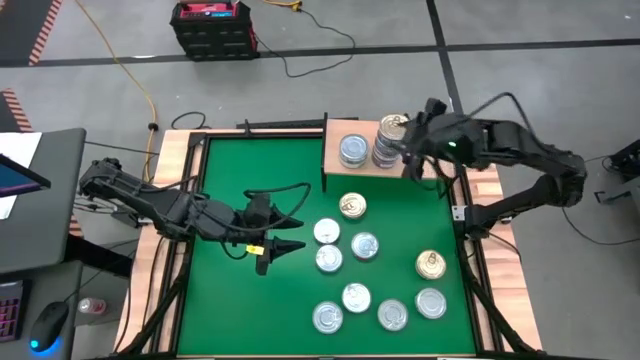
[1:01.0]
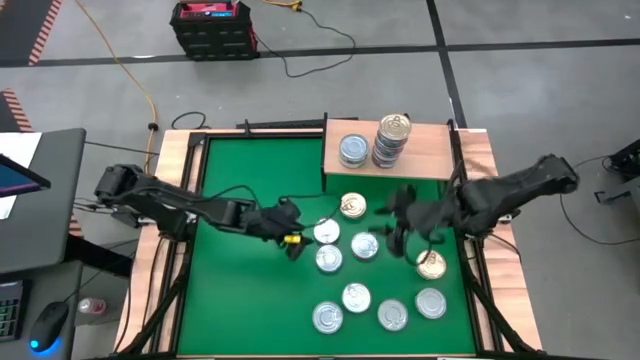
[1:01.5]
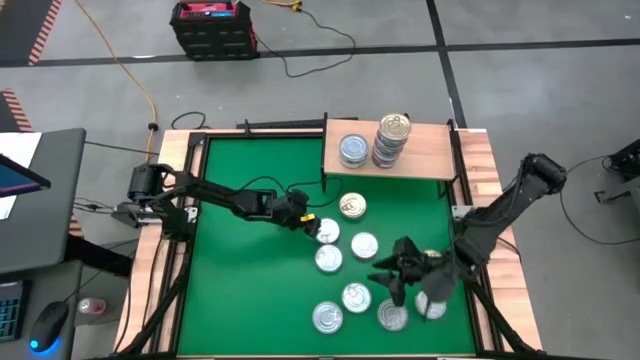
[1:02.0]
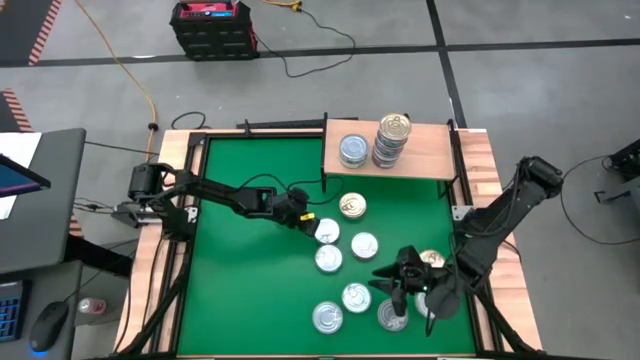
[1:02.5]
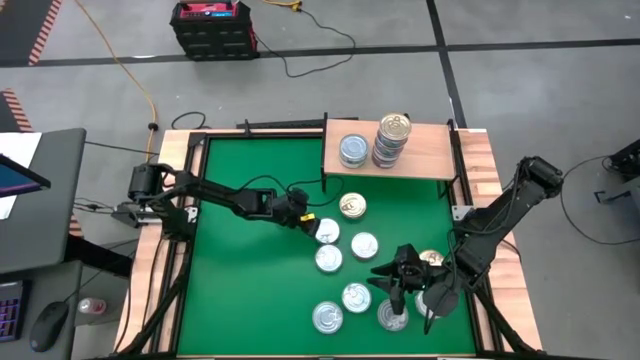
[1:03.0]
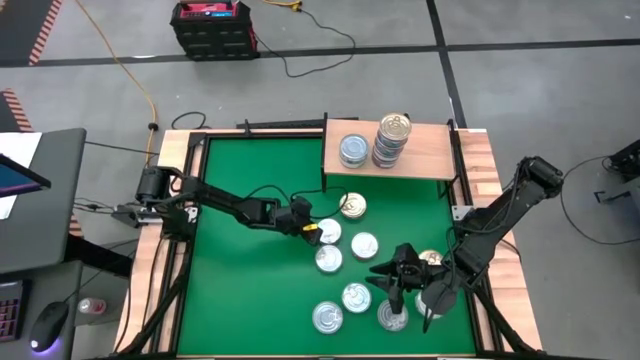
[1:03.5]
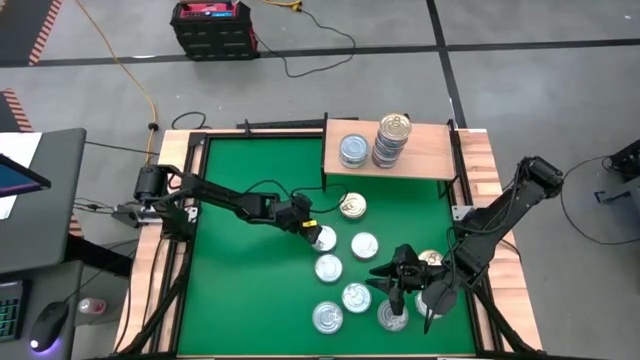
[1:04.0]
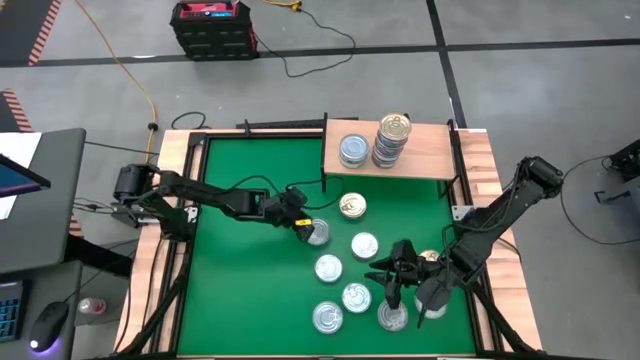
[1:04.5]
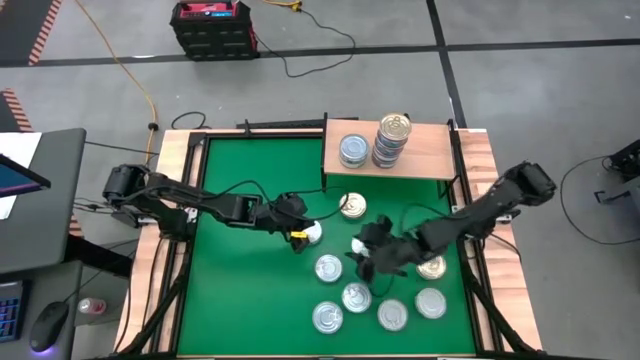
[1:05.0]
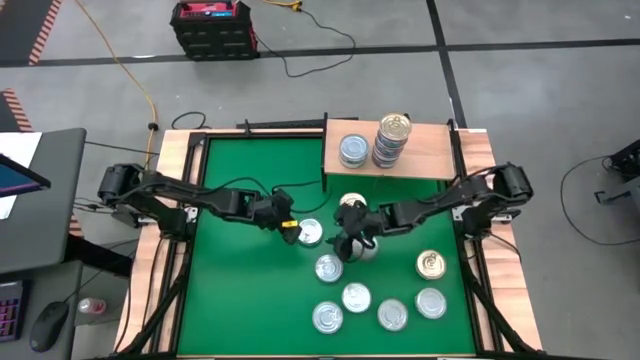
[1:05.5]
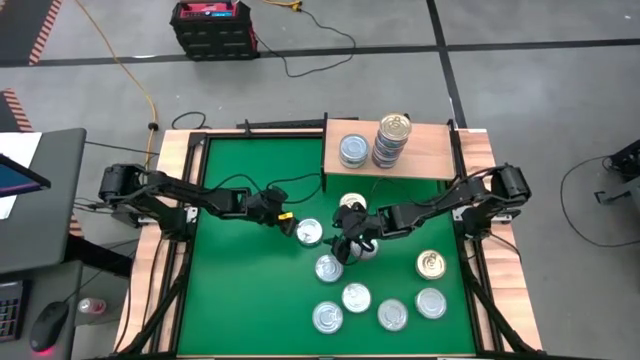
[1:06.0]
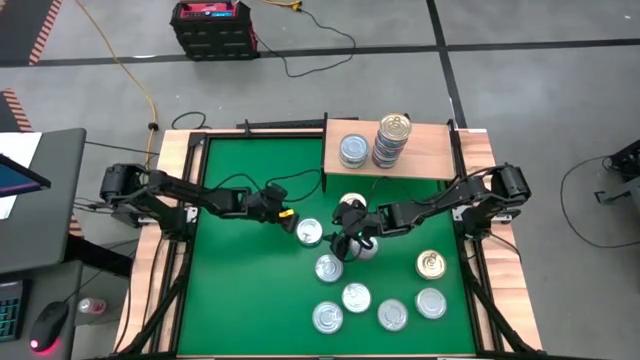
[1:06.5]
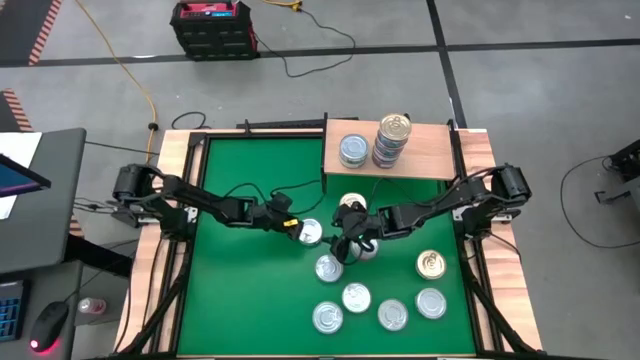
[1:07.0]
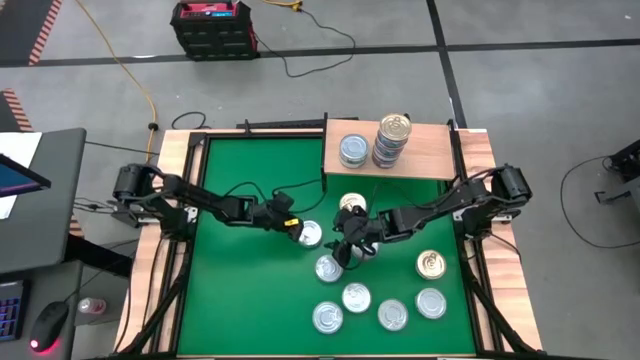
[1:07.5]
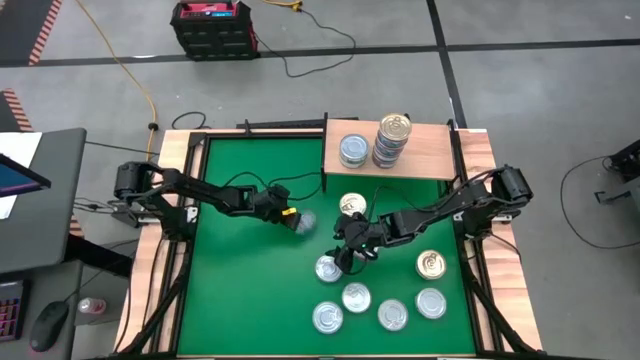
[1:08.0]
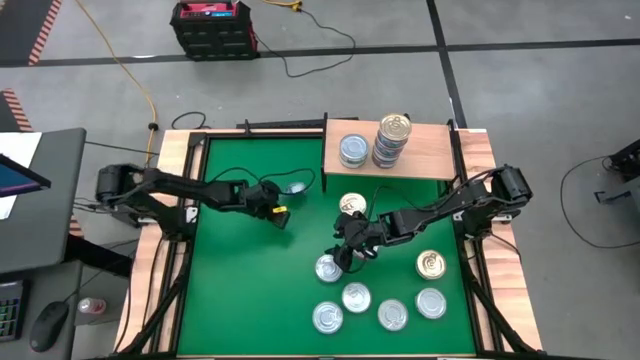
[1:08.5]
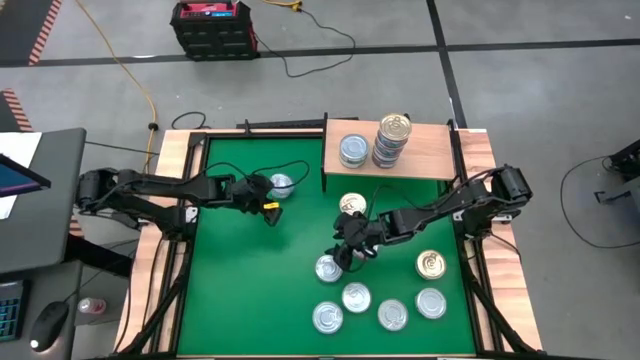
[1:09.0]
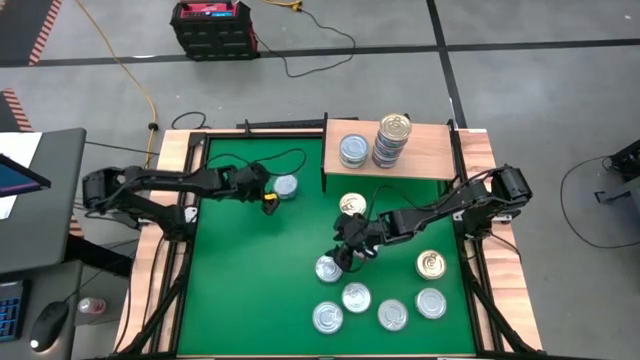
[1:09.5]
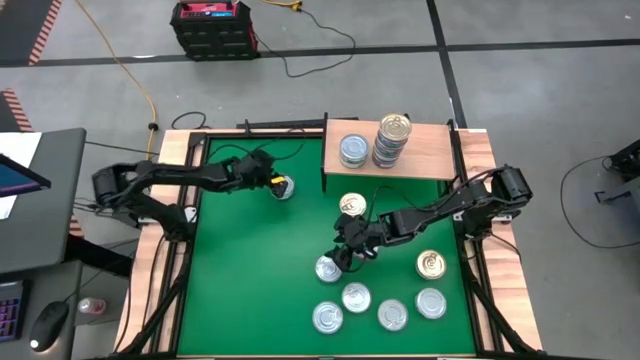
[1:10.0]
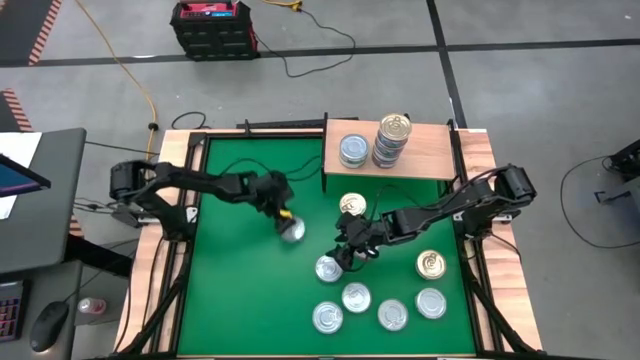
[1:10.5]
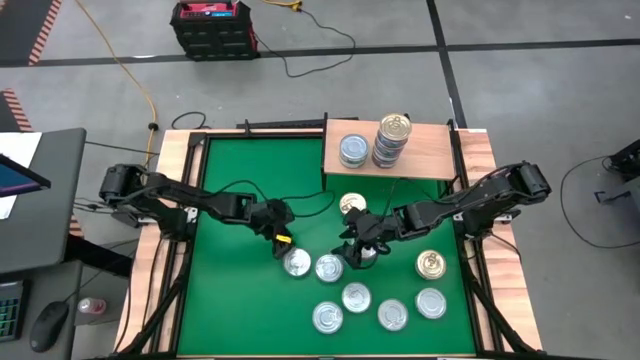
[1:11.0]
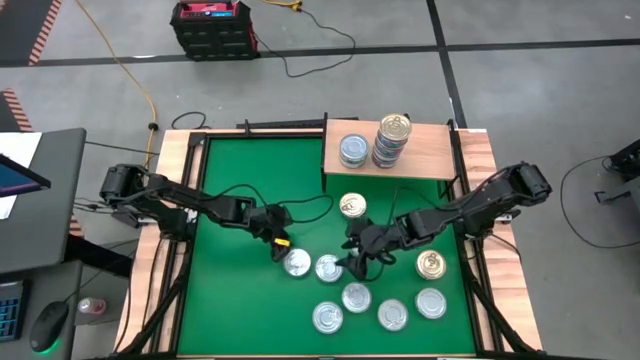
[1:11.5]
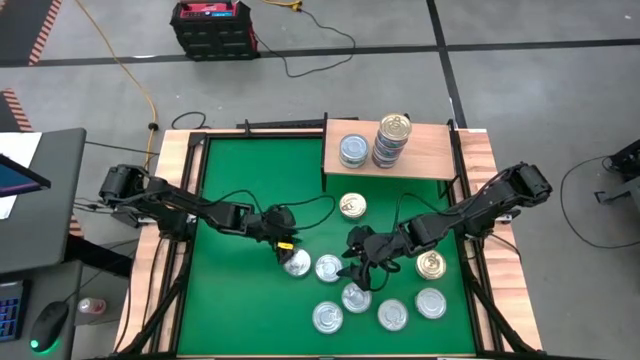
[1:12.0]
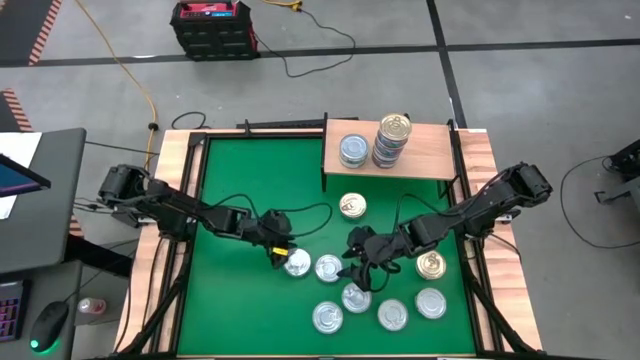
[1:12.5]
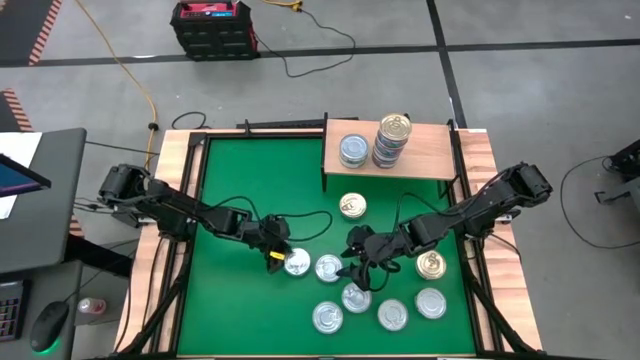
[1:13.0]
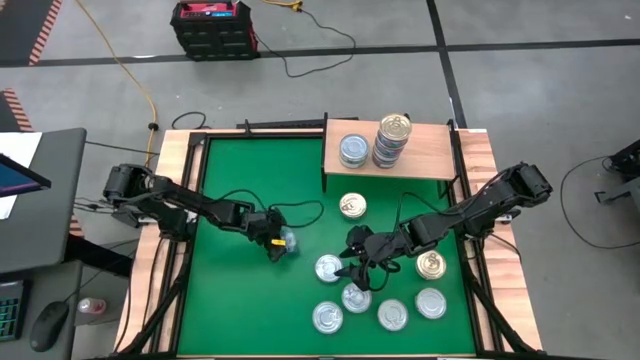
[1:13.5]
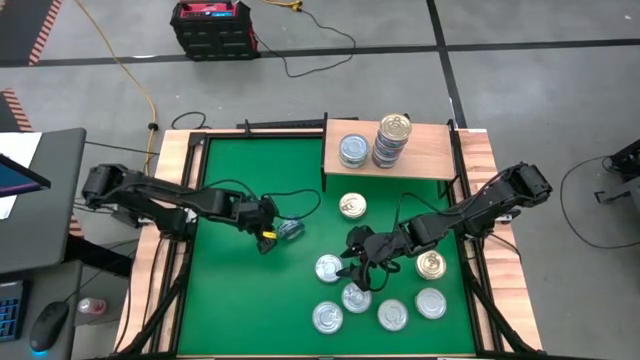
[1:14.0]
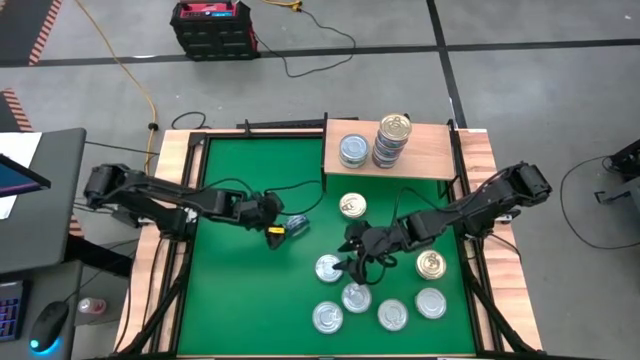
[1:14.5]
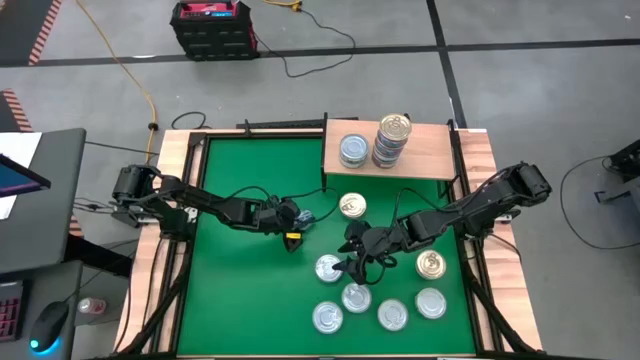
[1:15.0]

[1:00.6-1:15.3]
Task: Stack canned seafood by type on shelf
Put the blue tuna can on the shelf

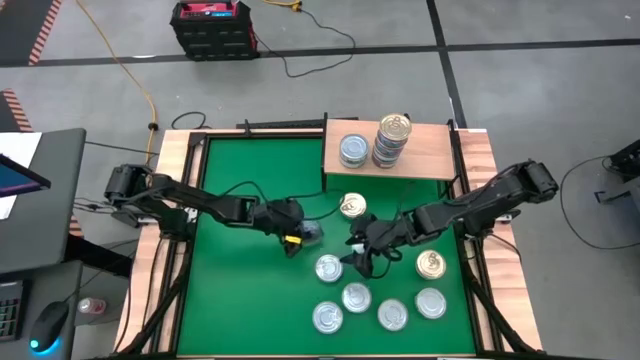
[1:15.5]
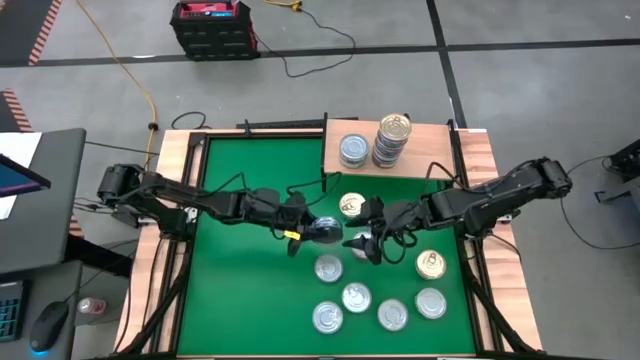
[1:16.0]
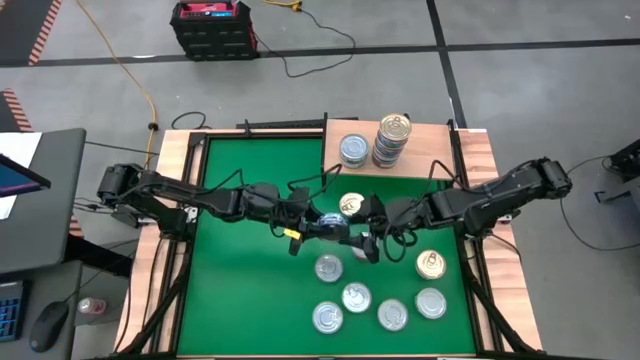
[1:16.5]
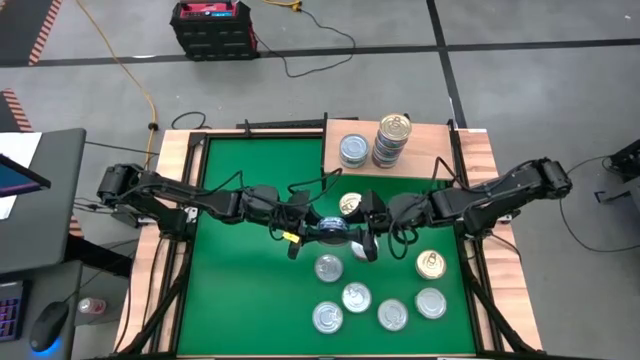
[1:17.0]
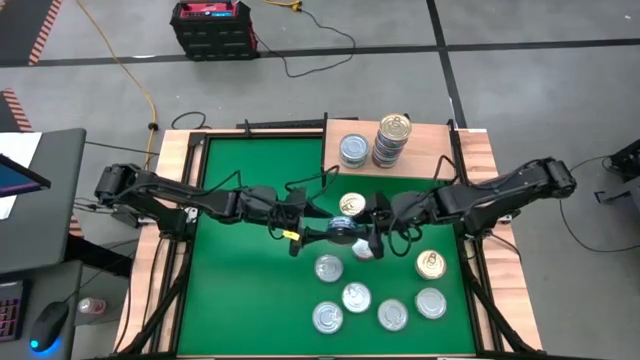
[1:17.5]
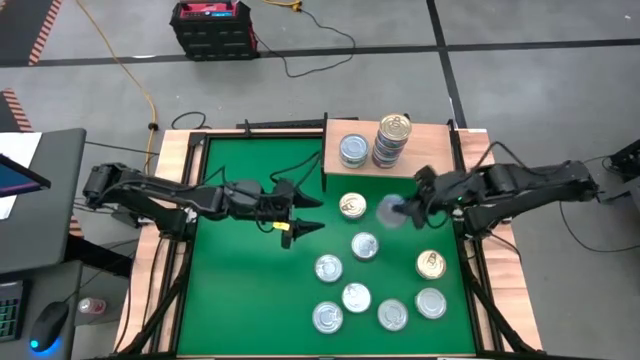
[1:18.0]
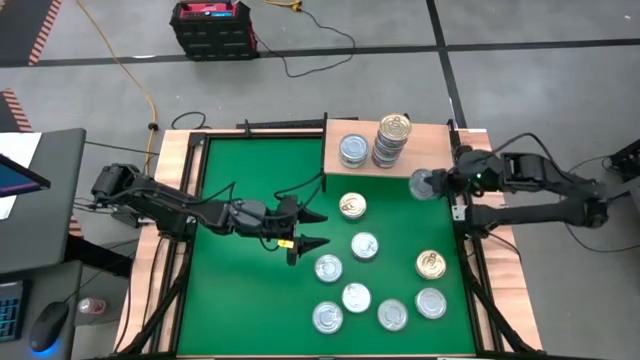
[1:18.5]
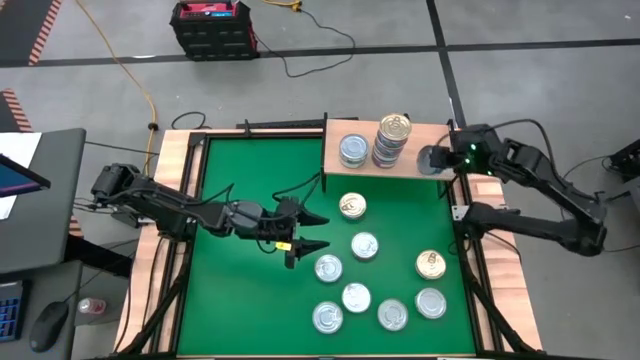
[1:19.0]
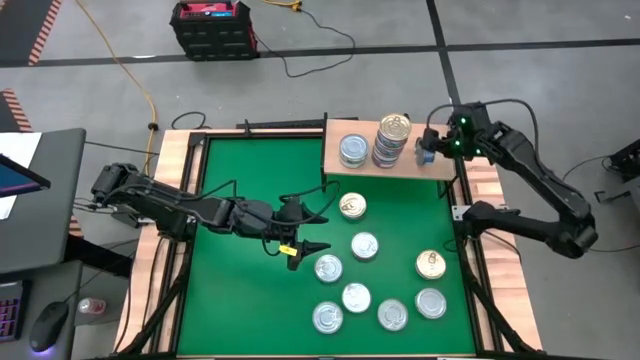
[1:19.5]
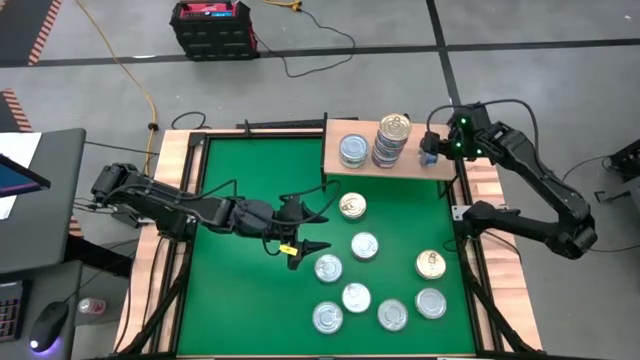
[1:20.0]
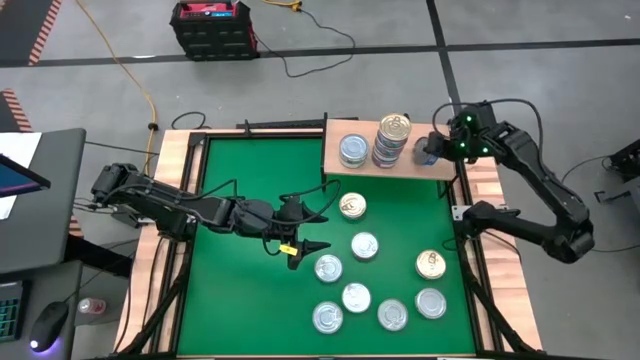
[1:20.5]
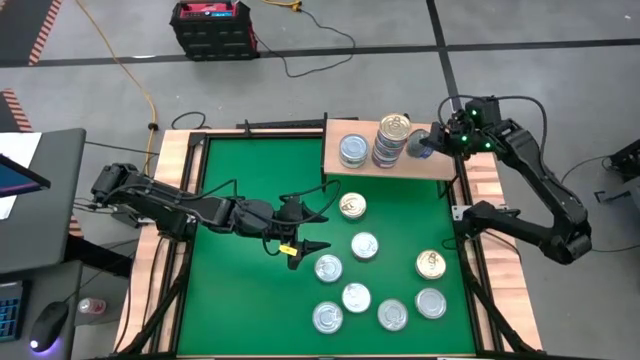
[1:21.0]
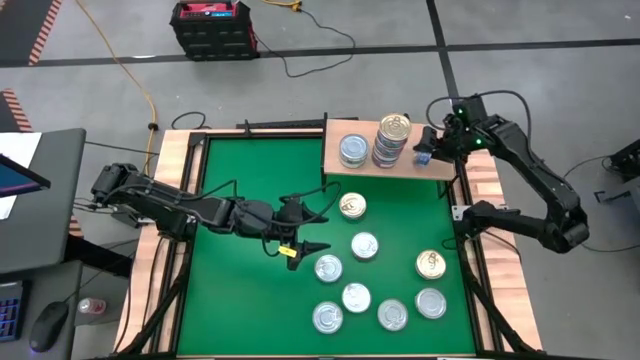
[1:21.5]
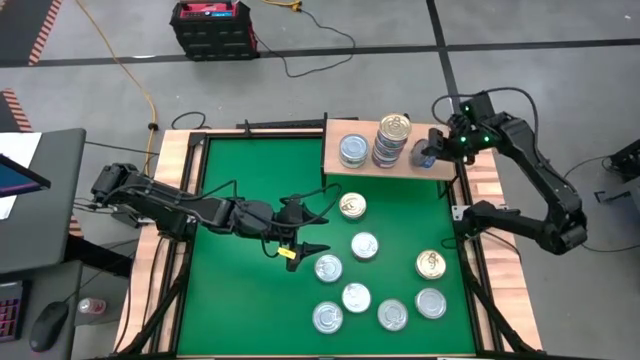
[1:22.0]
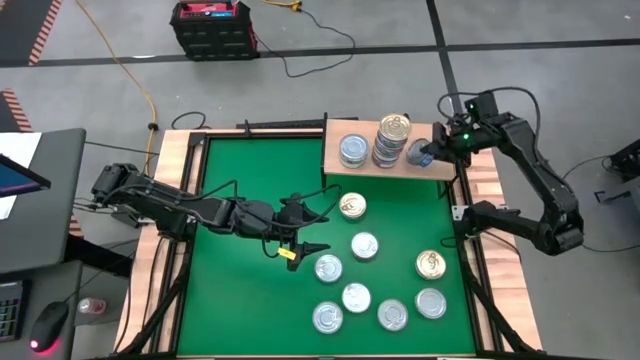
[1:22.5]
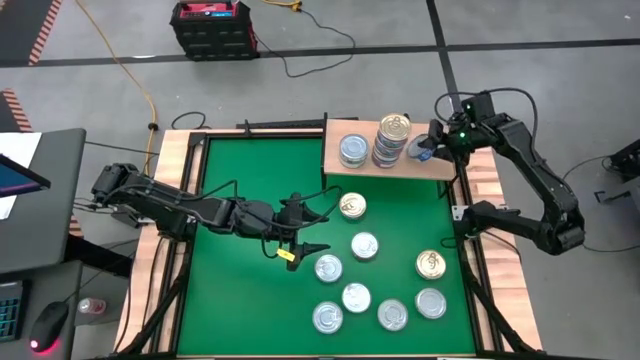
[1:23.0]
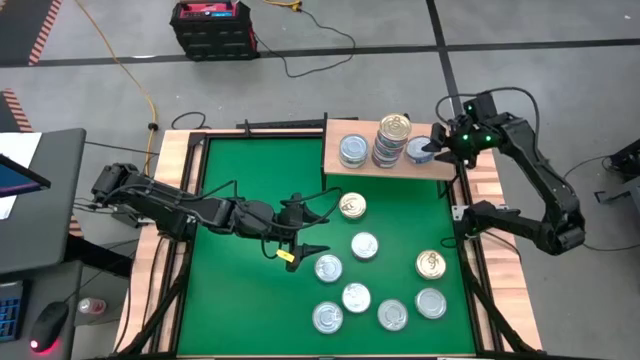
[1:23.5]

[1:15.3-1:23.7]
Put the blue tuna can on the shelf
